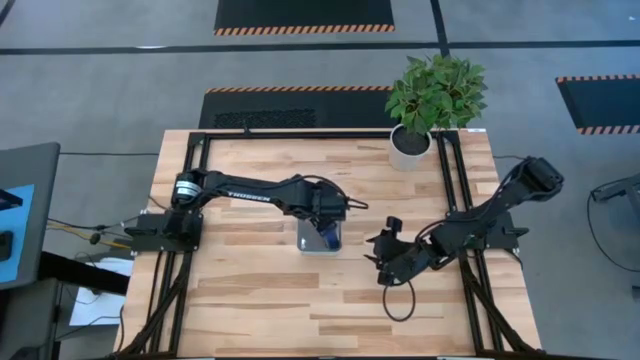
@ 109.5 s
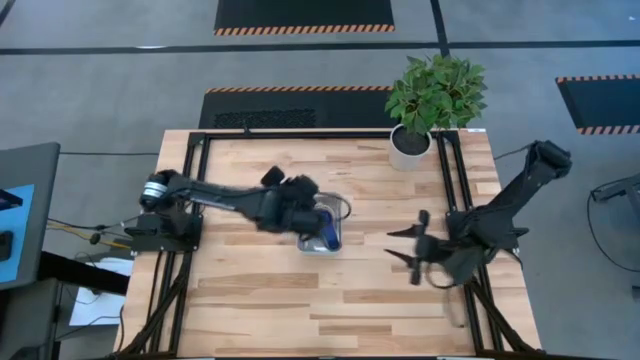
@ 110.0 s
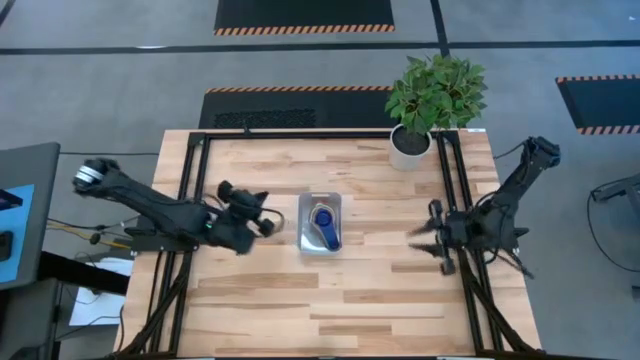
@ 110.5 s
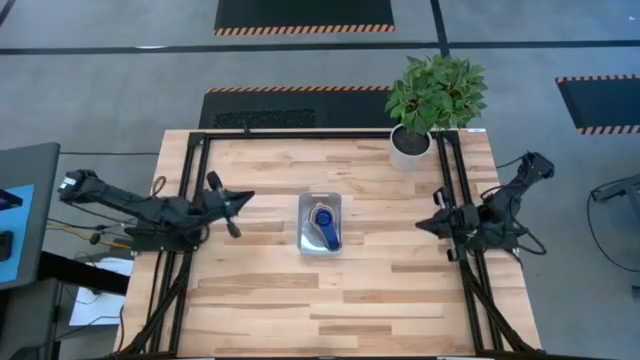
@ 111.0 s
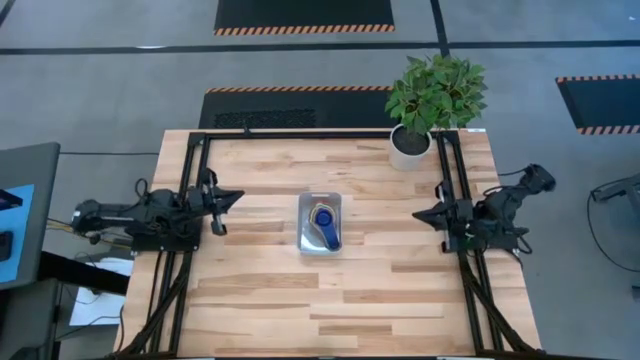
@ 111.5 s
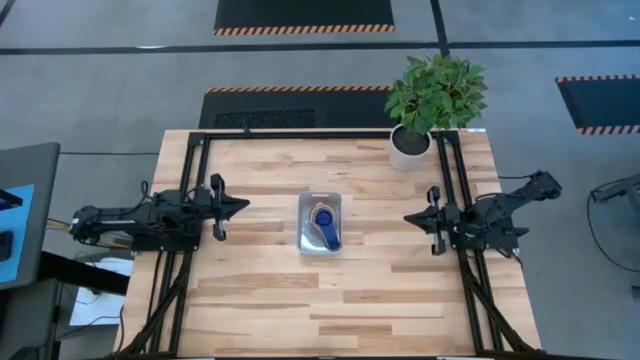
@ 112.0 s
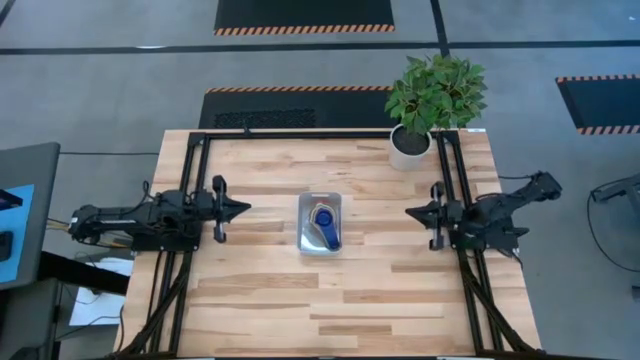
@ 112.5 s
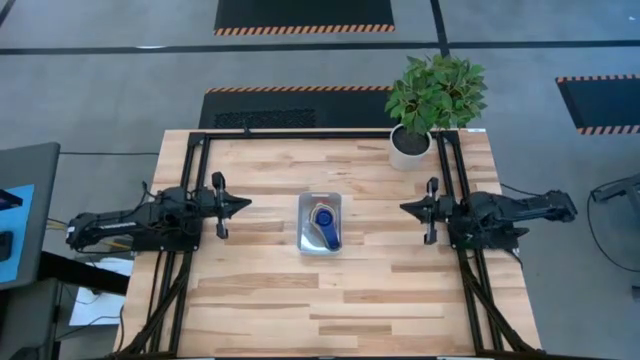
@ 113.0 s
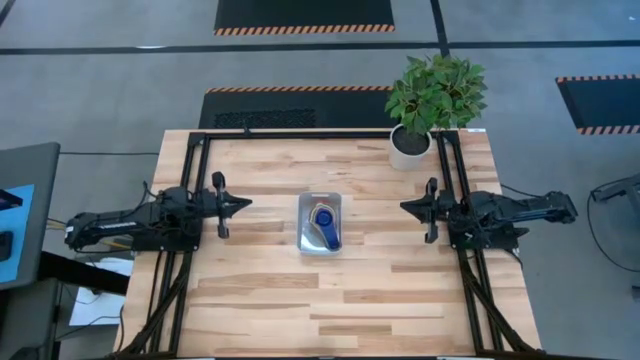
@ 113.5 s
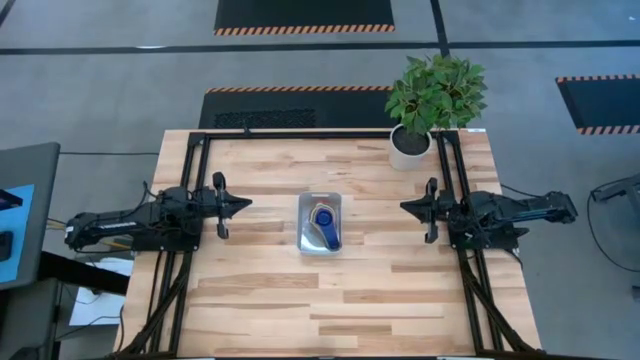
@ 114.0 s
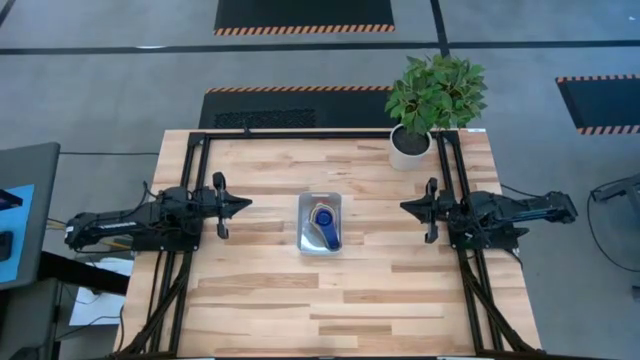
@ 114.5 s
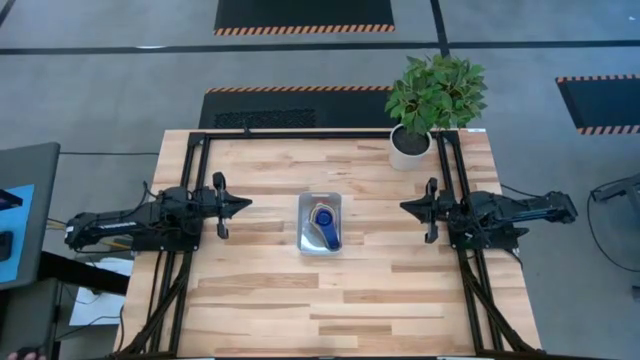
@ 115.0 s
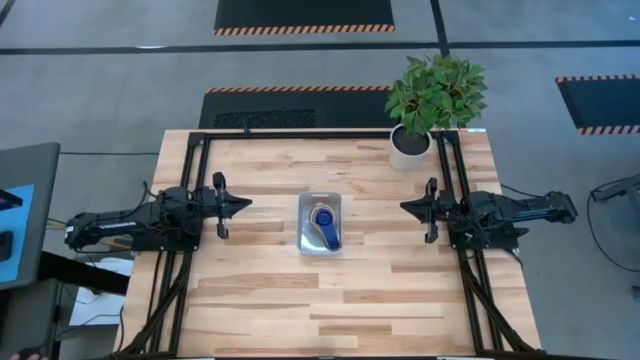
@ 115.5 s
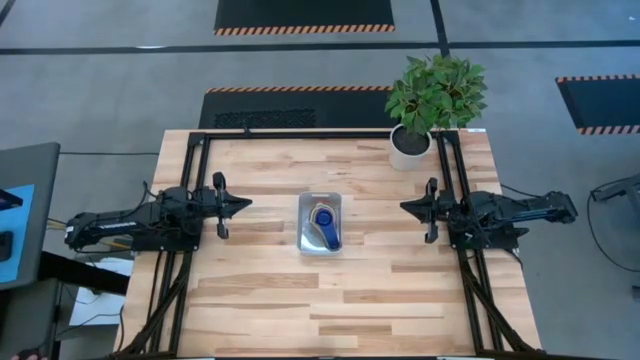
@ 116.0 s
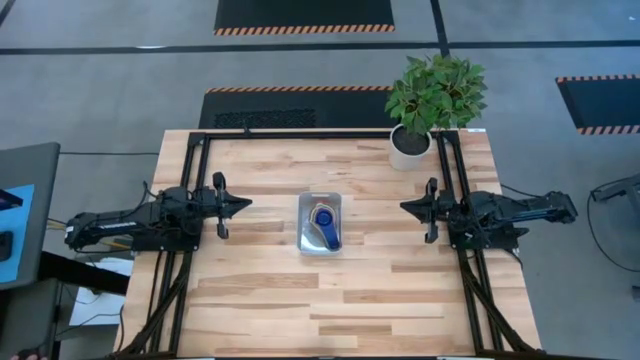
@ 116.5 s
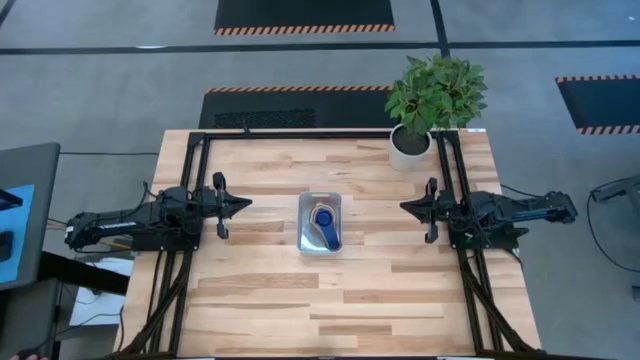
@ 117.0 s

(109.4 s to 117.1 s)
Task: Nest measuring cups in basket
Return to Home Position

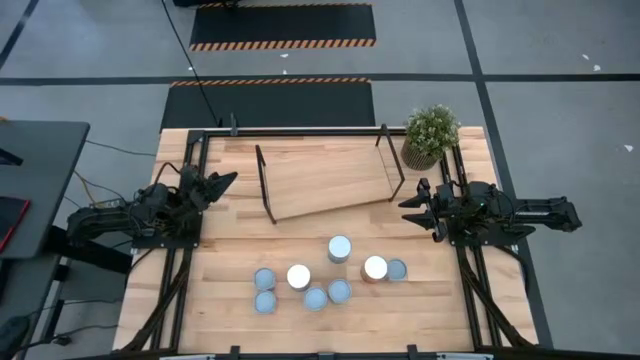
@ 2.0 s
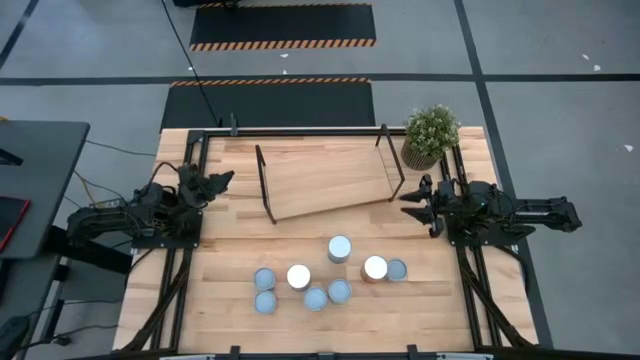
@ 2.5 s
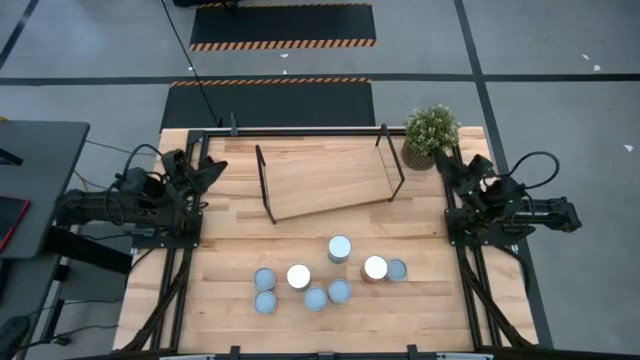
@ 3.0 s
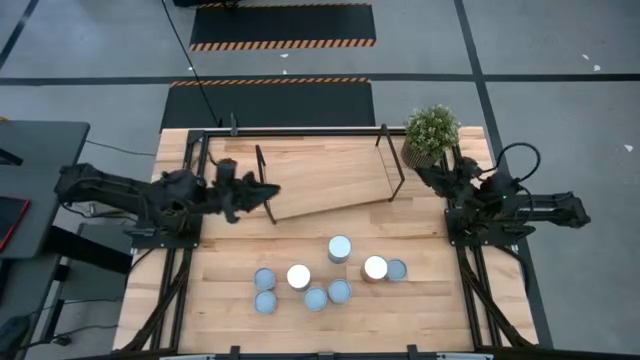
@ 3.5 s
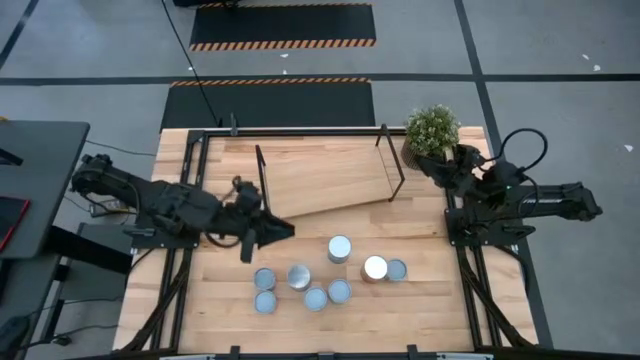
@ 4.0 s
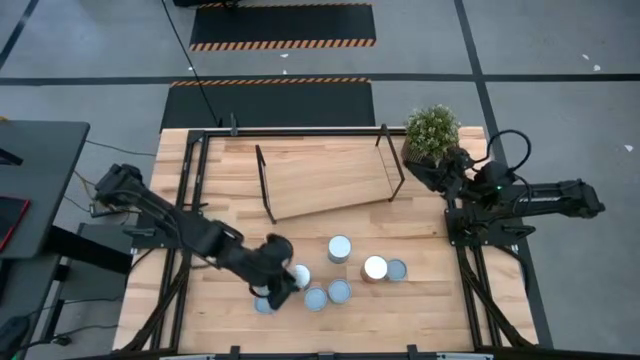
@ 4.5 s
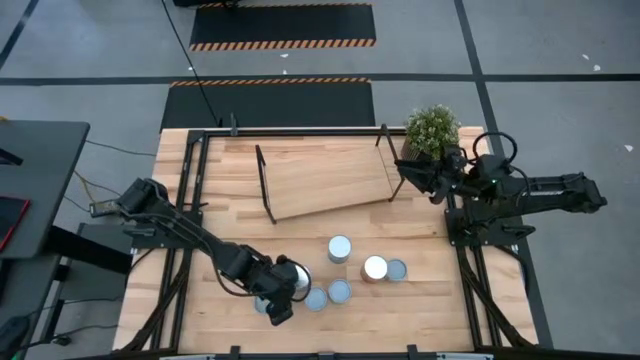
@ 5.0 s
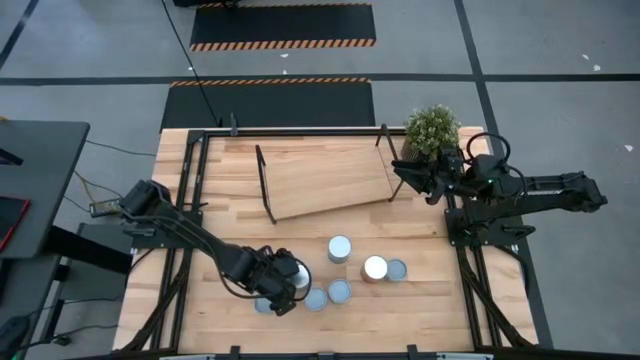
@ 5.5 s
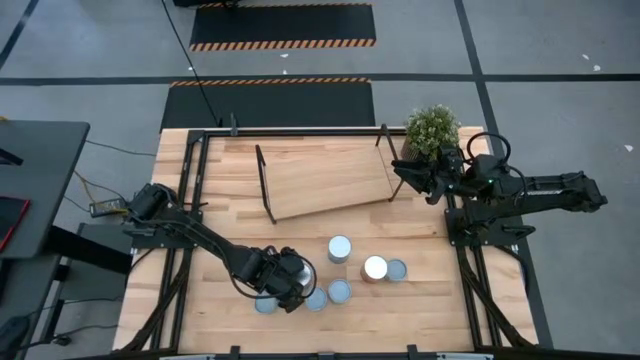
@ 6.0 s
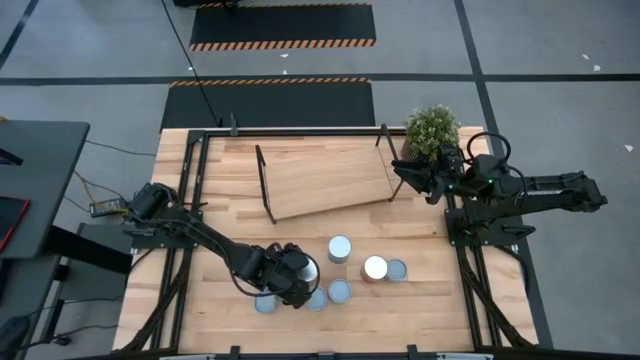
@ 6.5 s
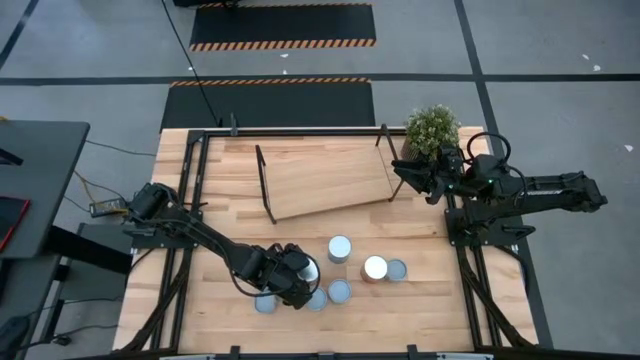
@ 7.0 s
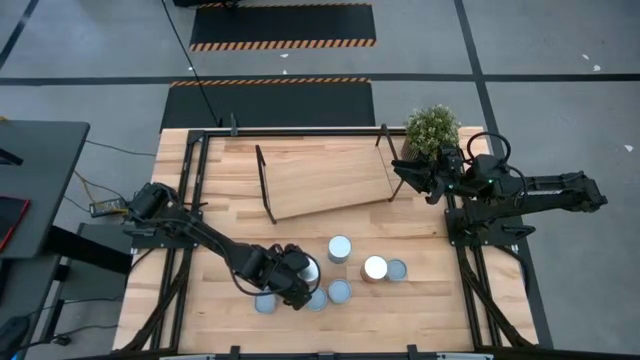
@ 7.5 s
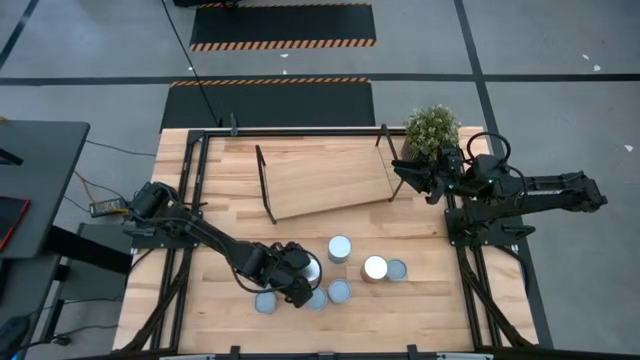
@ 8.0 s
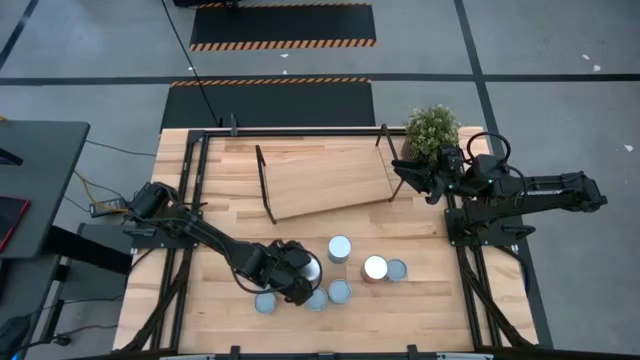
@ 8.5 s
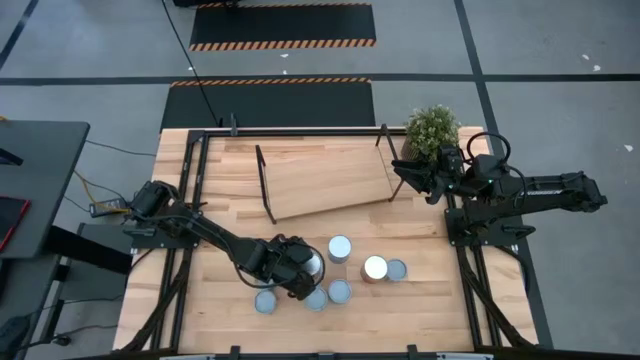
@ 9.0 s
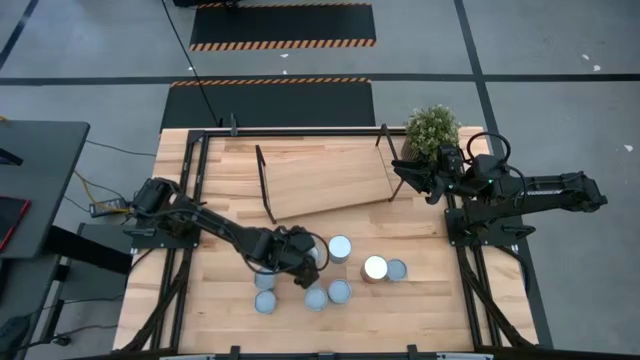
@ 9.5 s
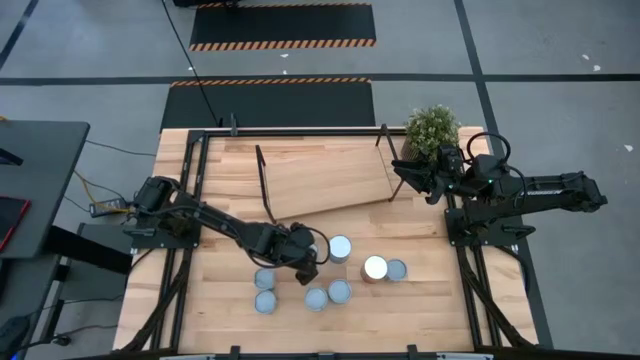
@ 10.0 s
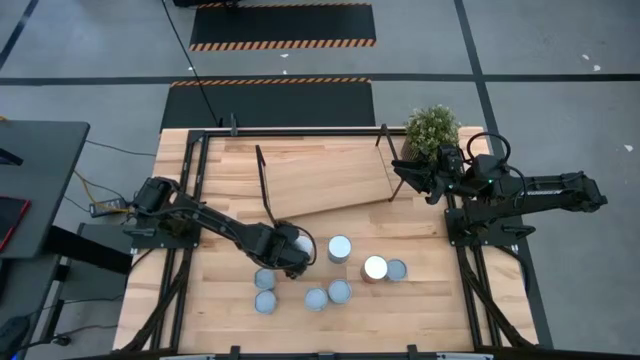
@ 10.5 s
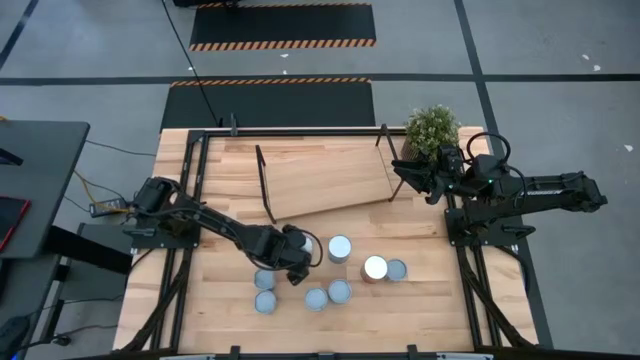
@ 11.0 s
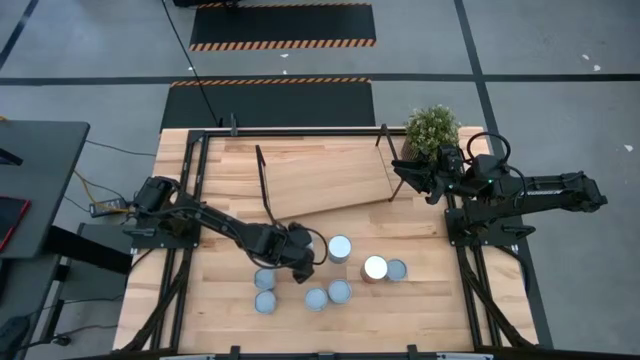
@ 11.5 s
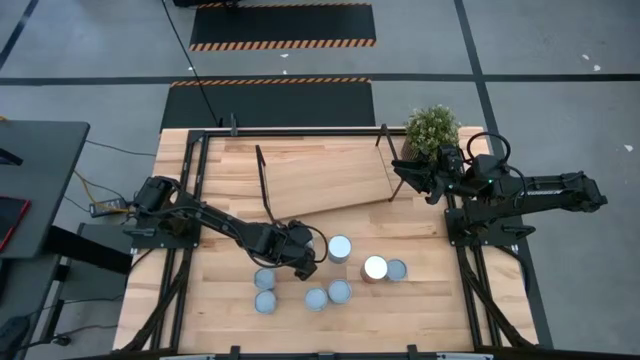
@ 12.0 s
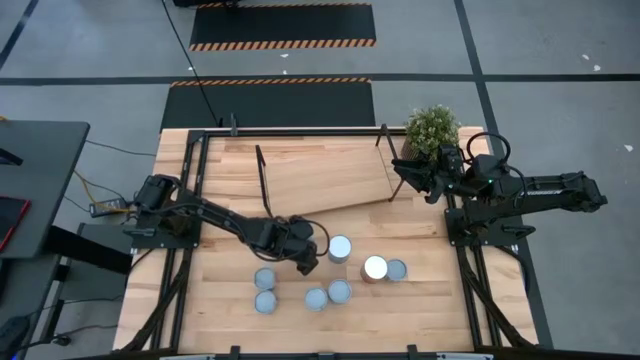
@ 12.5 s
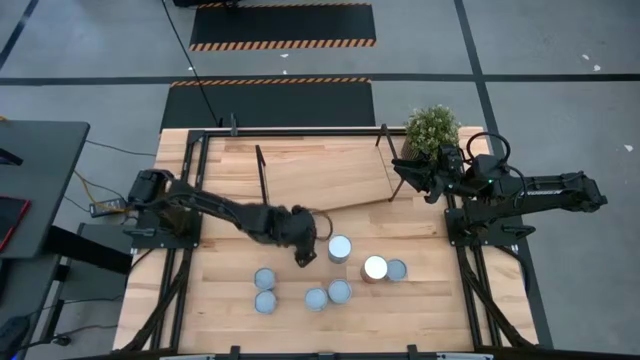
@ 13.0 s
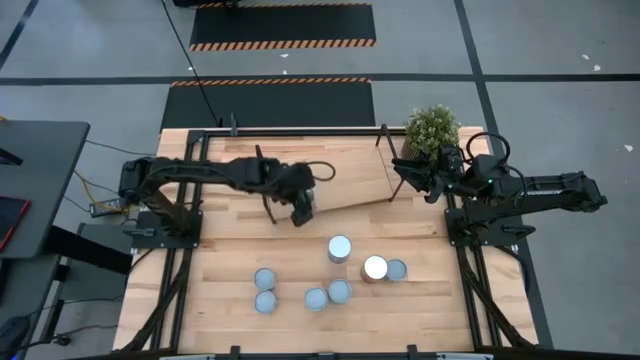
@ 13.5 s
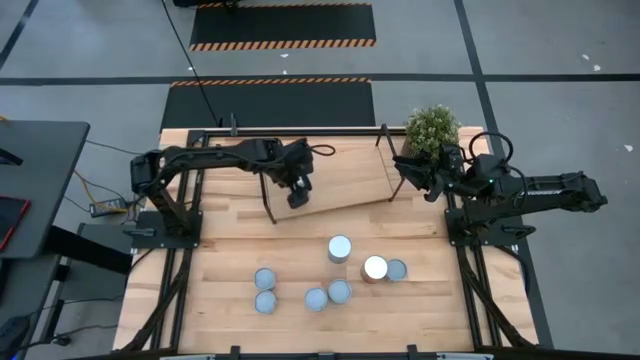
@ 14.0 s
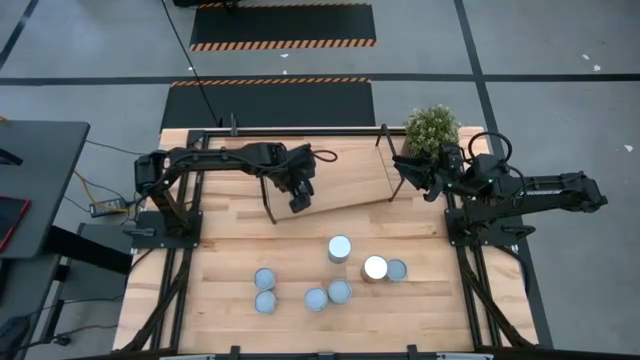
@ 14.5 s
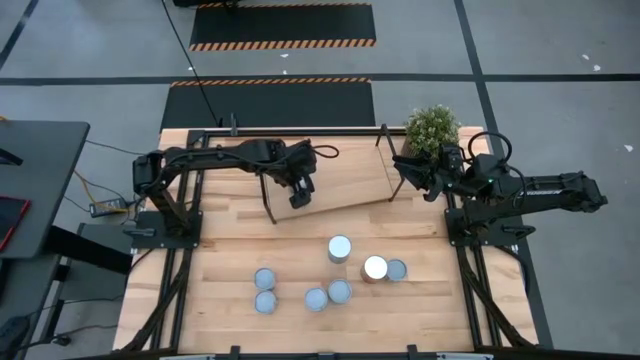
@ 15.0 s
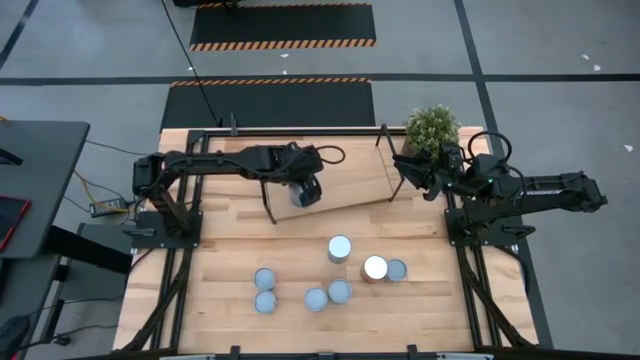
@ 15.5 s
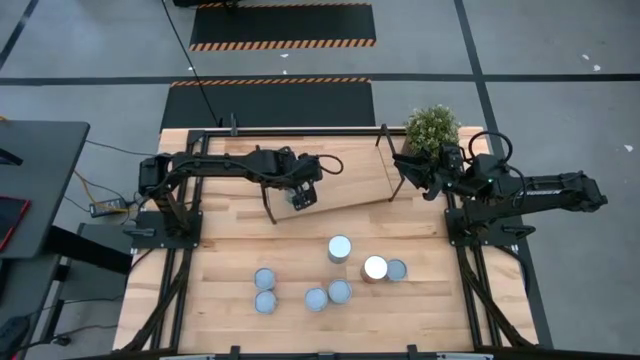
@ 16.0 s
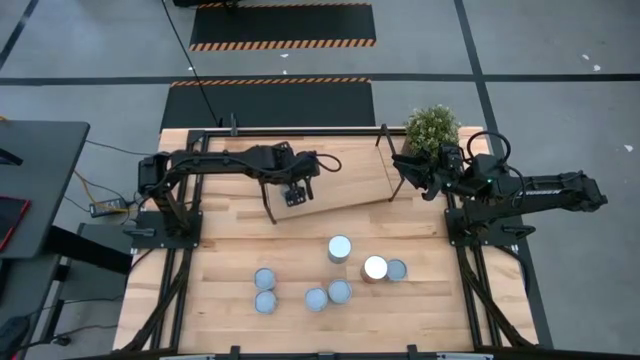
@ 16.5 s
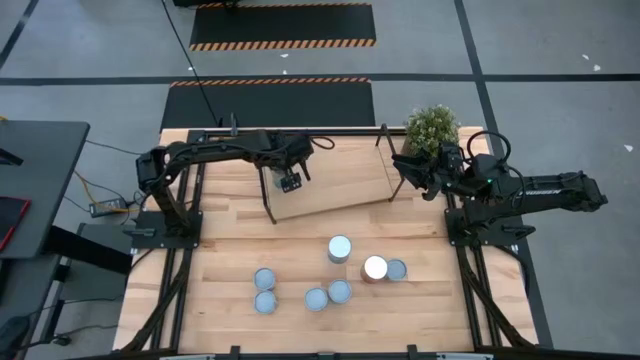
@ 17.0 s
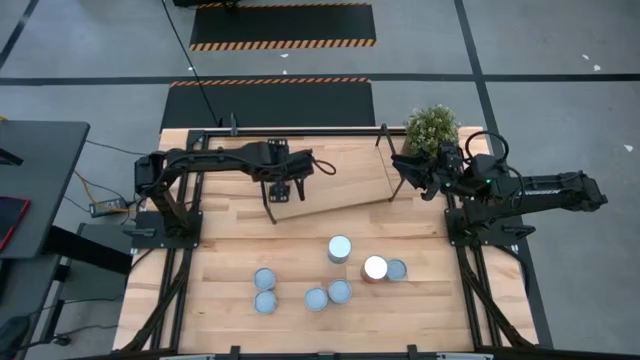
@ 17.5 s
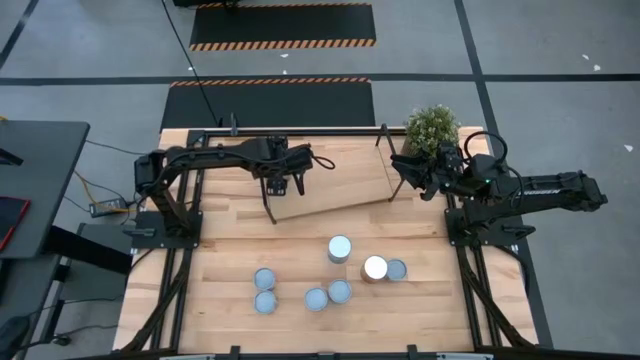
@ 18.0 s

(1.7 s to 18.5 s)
Task: Pick and place cans onto a shelf
Put the canned tomatoes on the shelf
